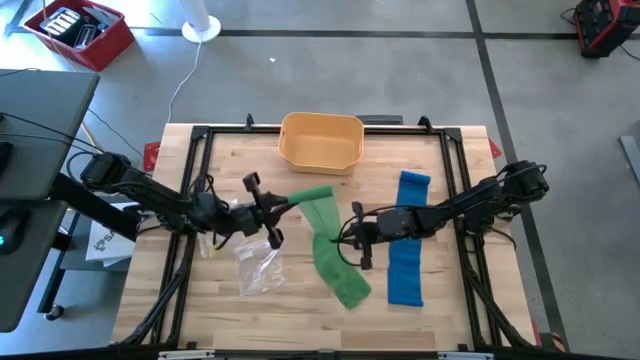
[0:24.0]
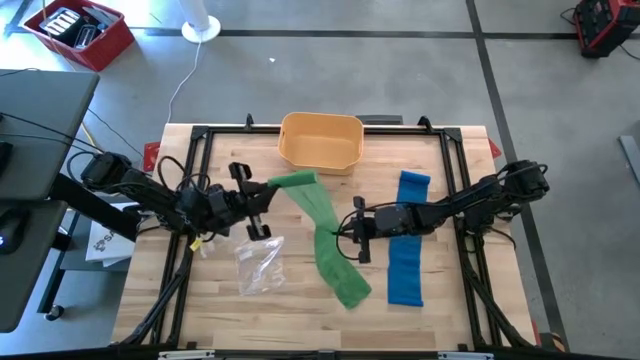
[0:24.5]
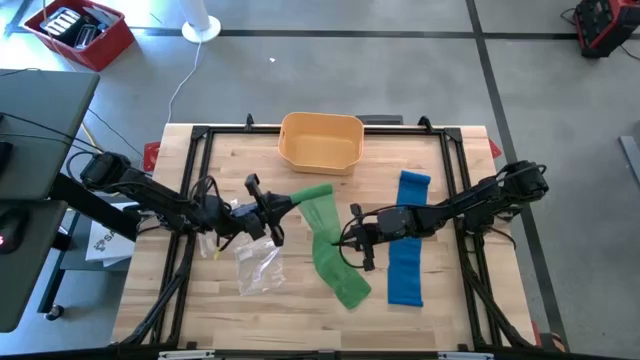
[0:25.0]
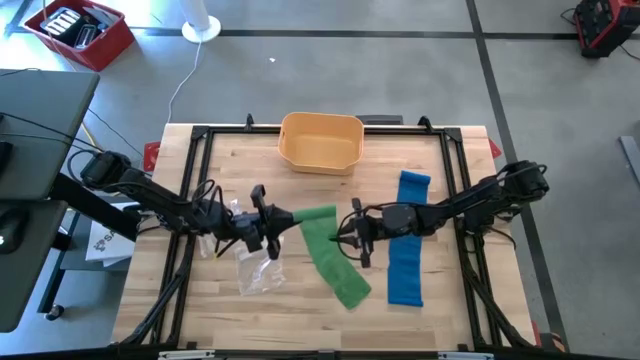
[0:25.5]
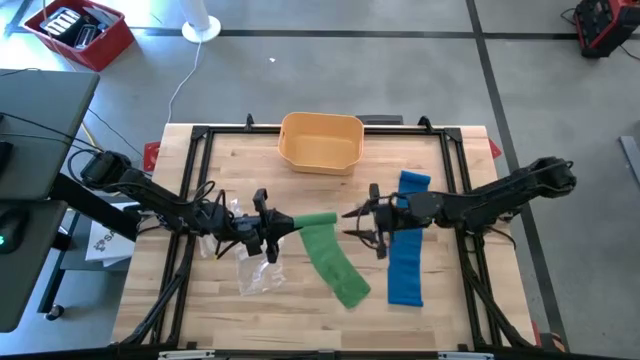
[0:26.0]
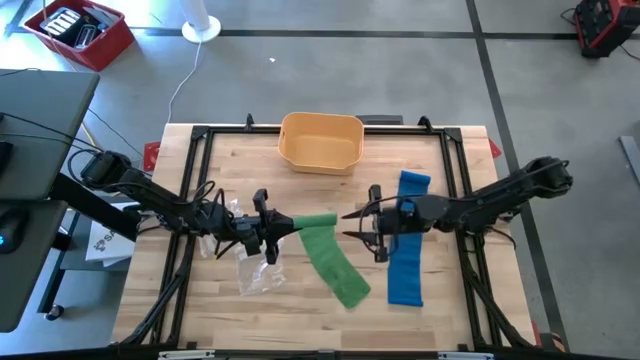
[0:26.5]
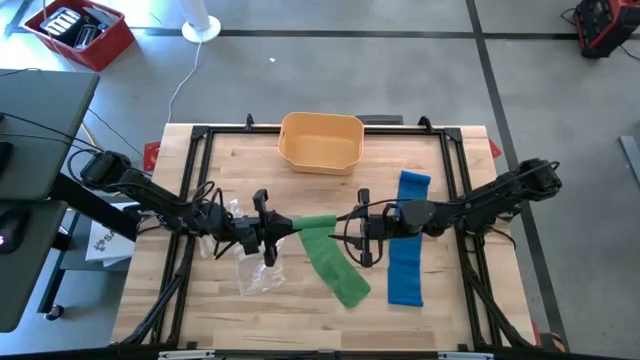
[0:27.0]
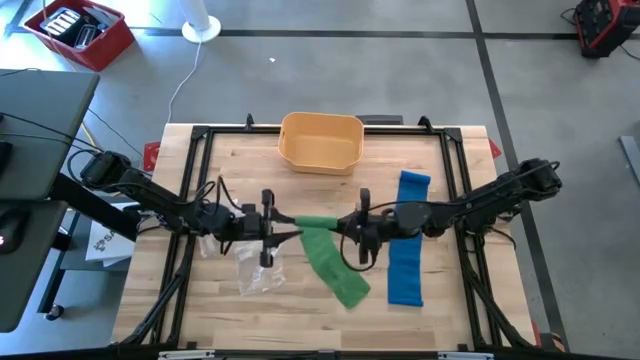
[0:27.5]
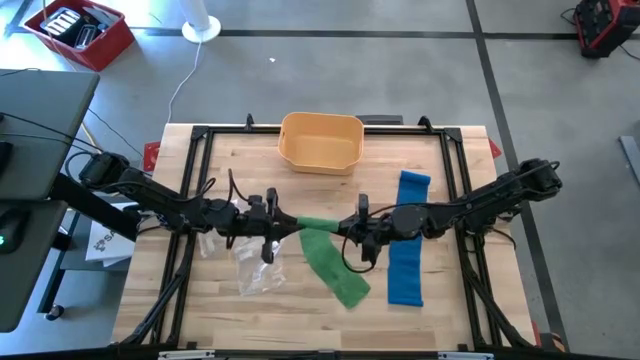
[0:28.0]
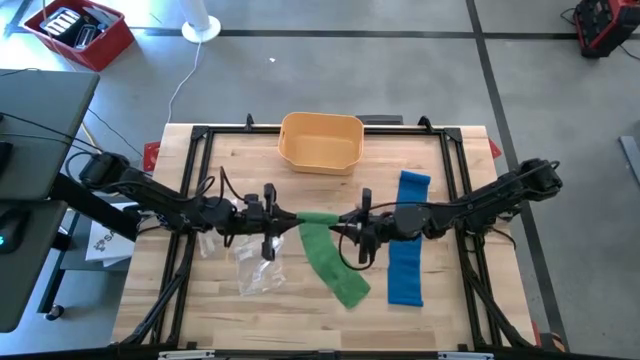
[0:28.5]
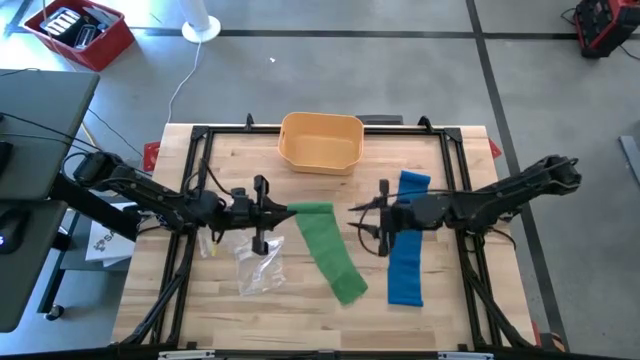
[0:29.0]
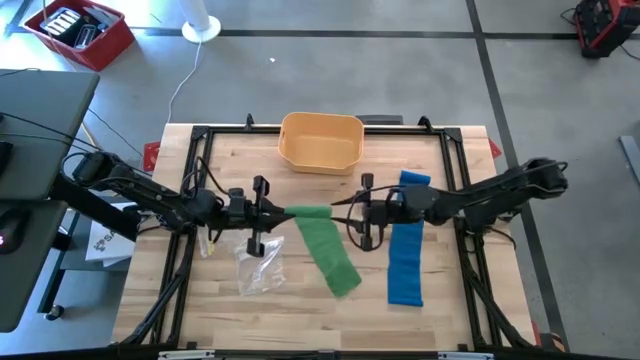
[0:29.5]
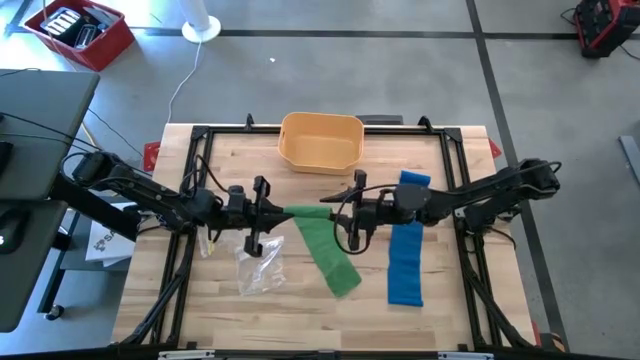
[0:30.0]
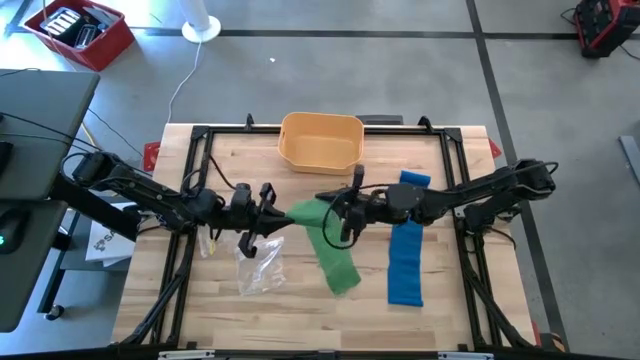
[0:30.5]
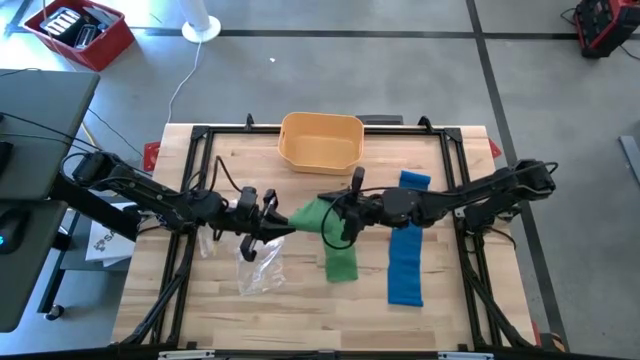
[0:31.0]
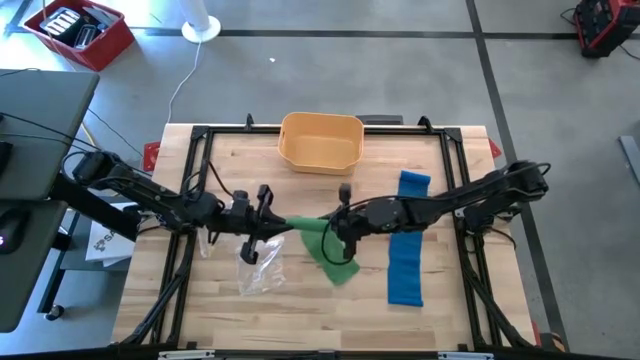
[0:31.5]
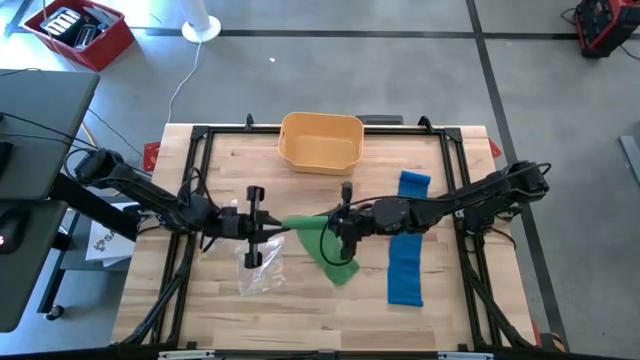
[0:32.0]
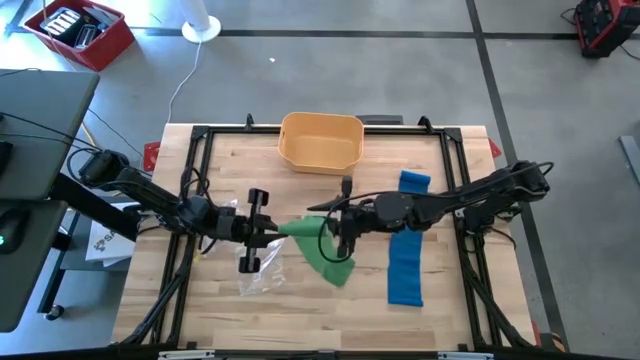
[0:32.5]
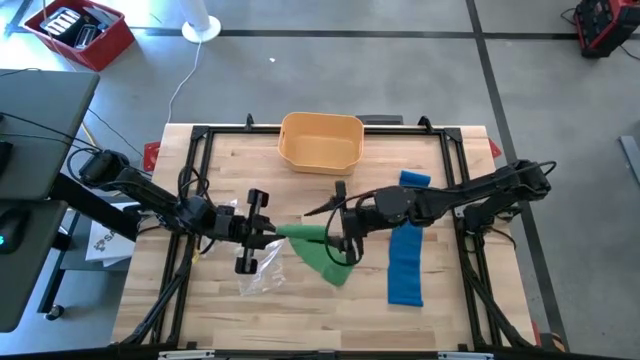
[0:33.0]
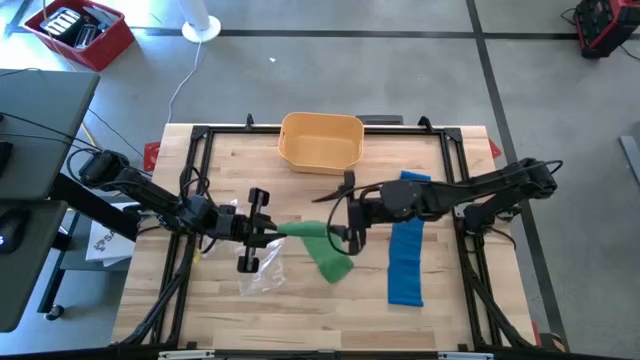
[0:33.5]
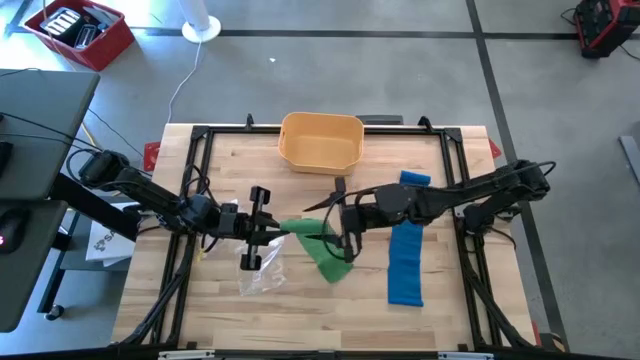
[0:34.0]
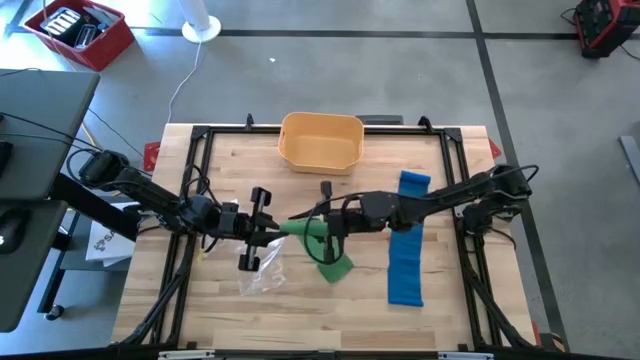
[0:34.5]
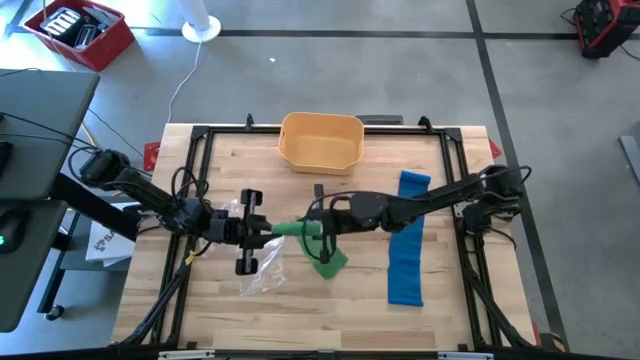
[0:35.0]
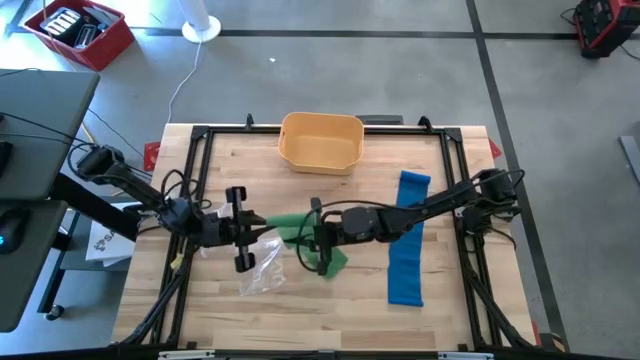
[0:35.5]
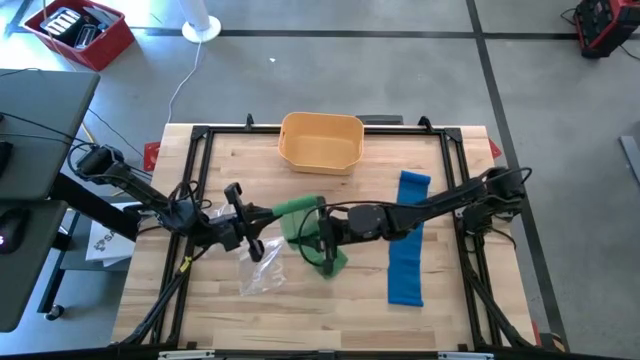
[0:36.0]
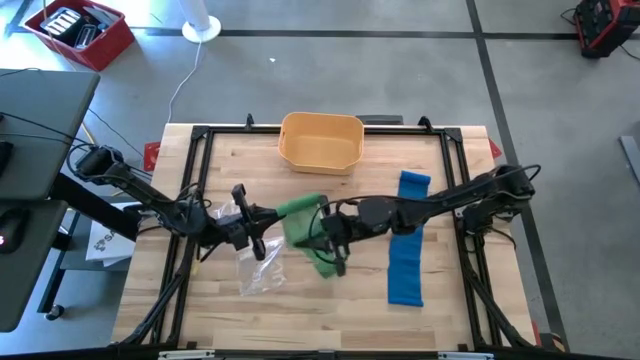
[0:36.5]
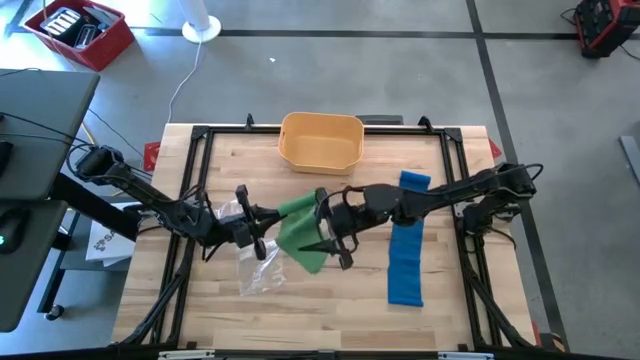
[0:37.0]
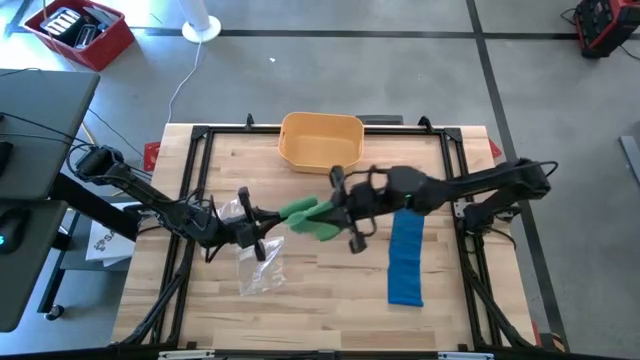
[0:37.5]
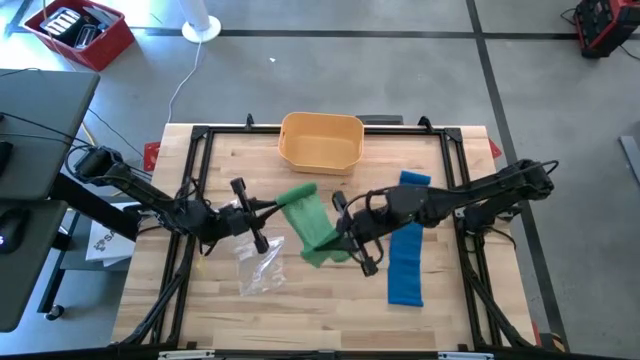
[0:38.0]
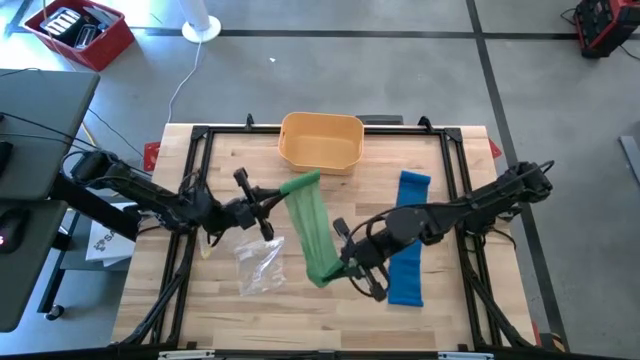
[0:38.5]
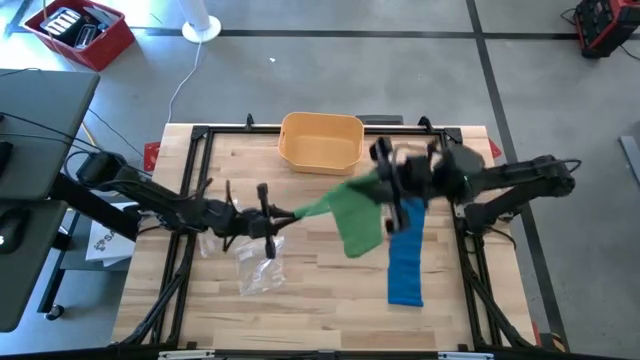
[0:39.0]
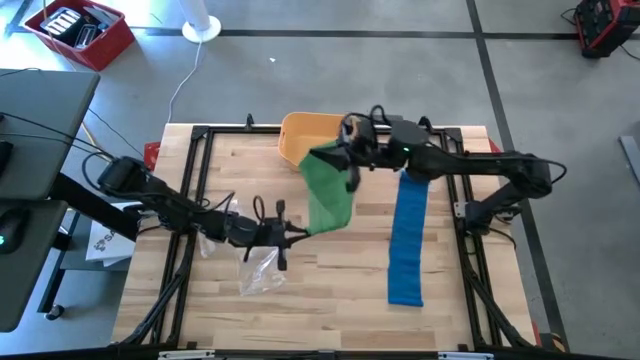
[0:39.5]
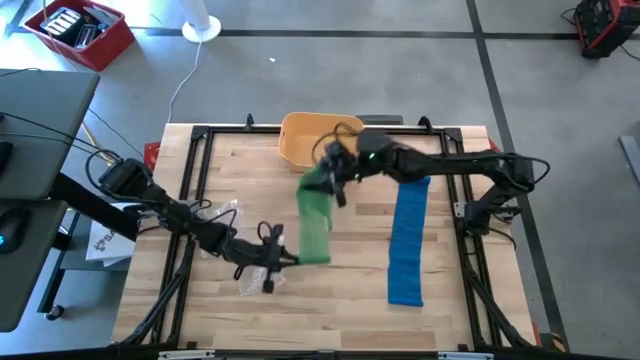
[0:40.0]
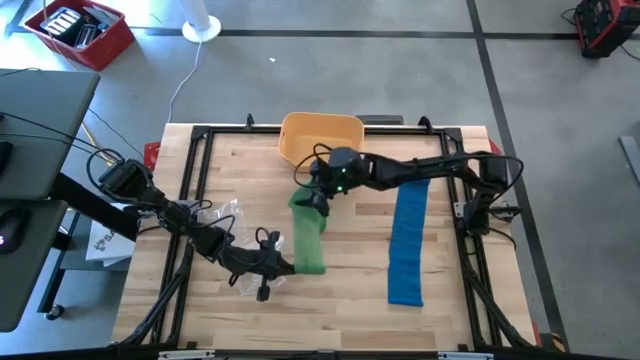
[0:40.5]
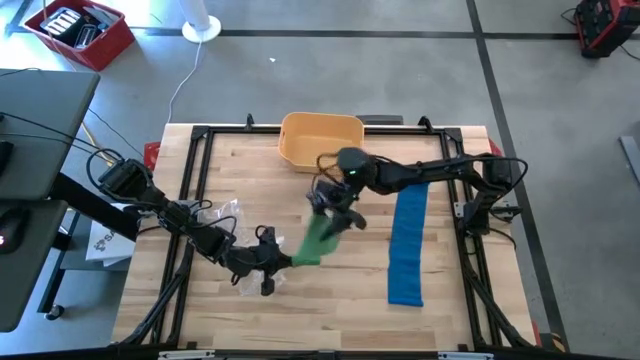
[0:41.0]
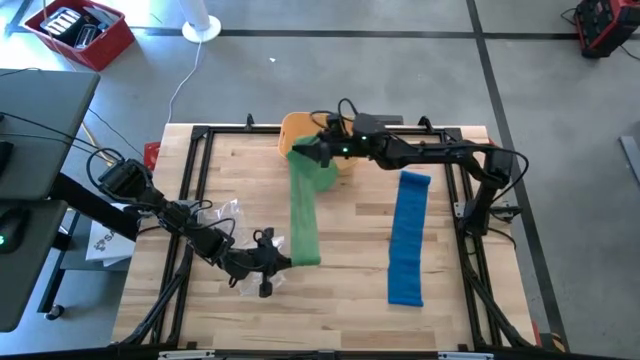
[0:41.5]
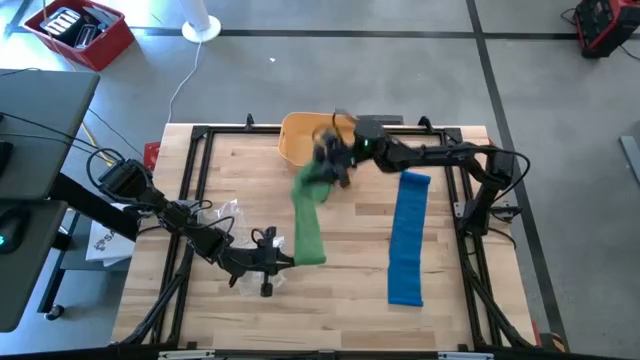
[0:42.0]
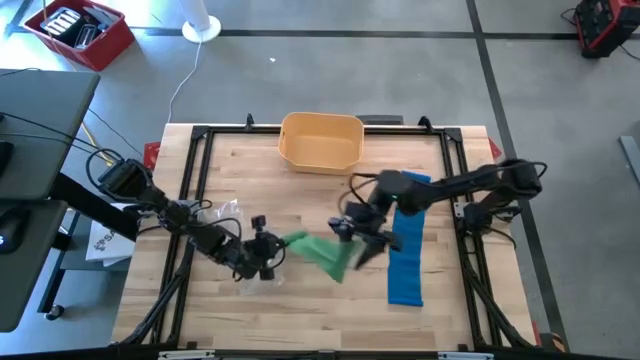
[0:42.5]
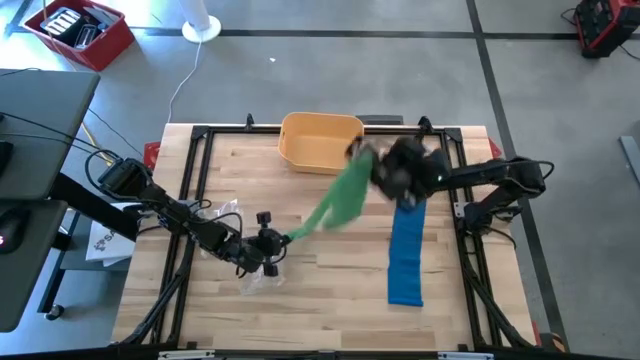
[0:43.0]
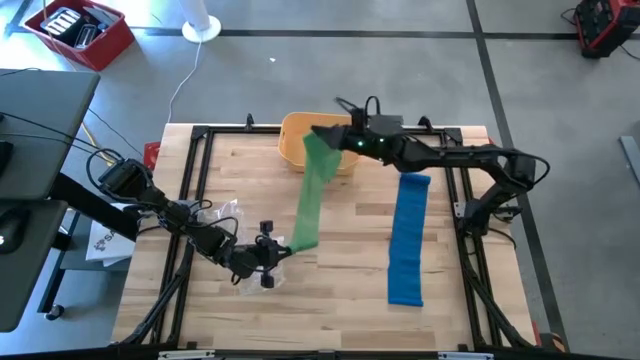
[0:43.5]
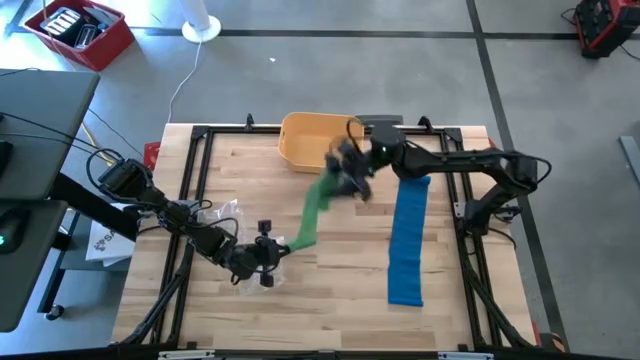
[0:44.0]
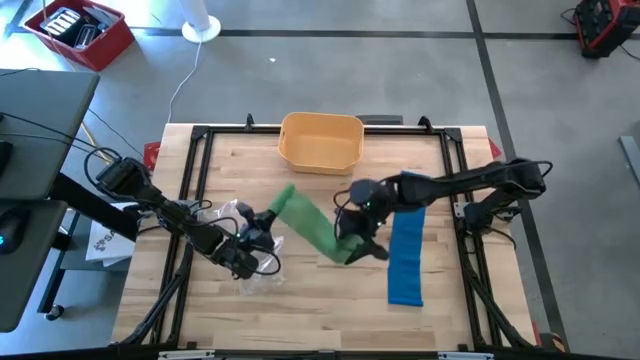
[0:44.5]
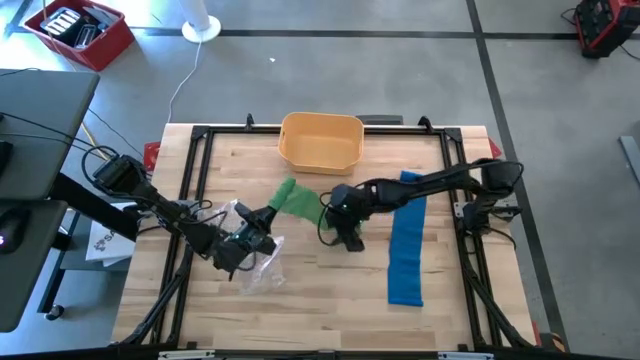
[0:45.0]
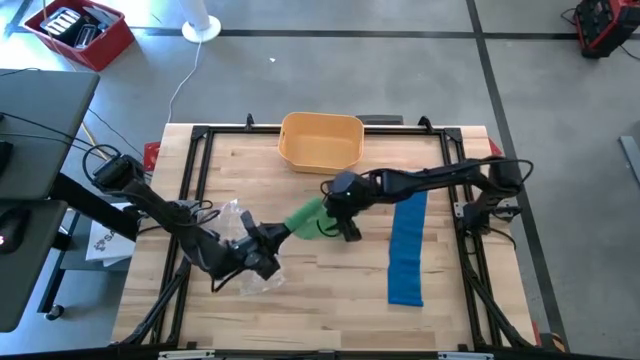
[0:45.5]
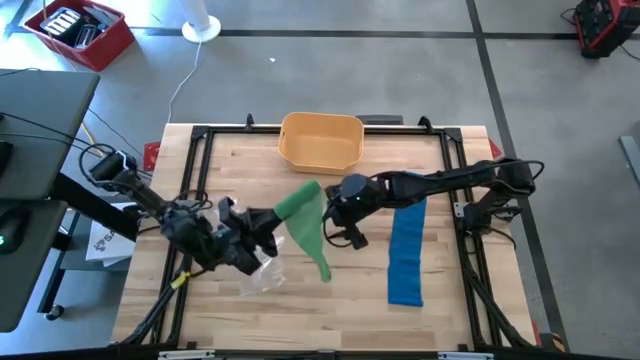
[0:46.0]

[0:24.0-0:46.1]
Task: Roll bandage
Roll the green bandage
